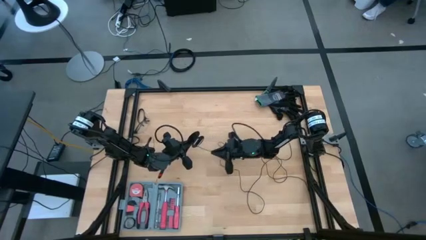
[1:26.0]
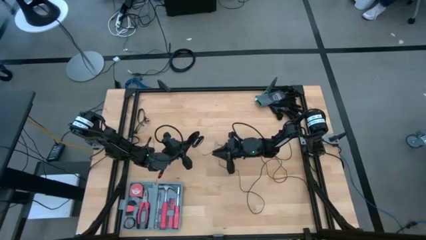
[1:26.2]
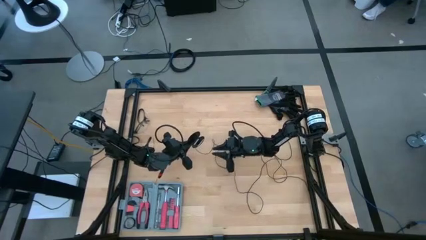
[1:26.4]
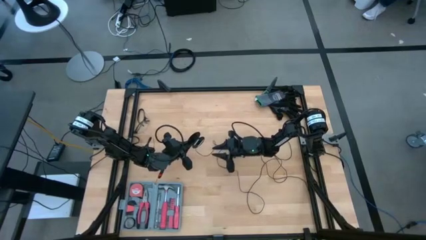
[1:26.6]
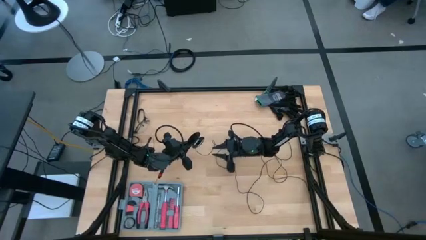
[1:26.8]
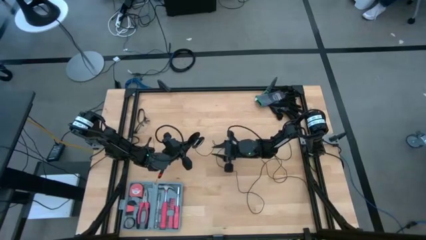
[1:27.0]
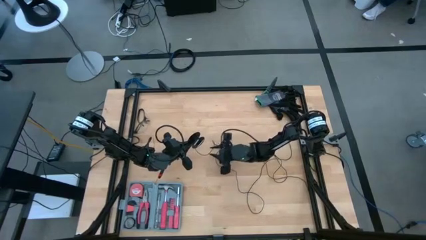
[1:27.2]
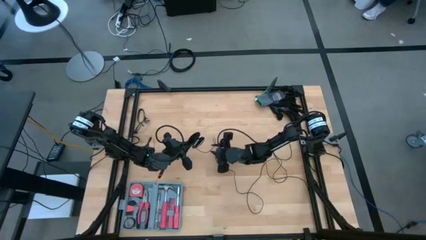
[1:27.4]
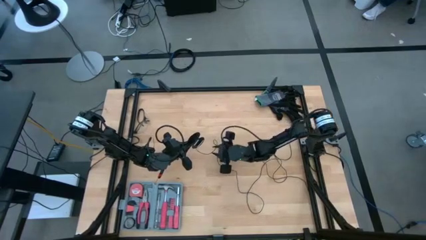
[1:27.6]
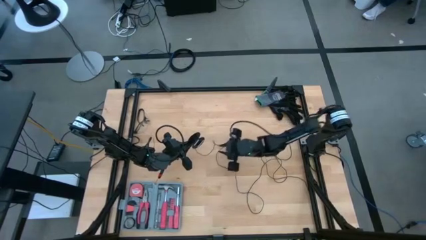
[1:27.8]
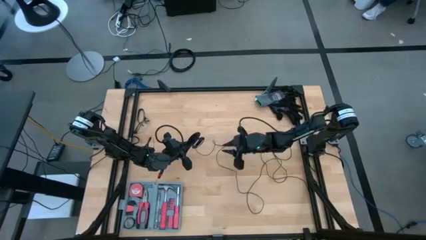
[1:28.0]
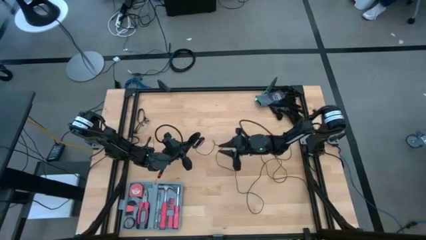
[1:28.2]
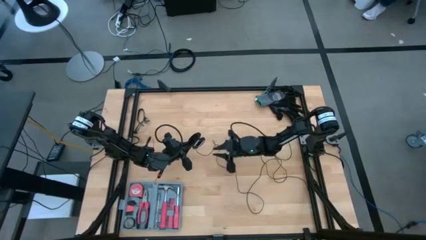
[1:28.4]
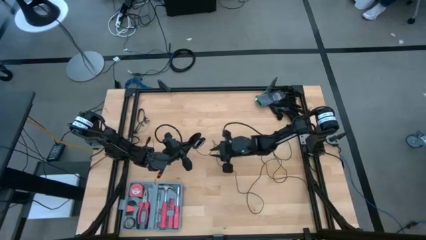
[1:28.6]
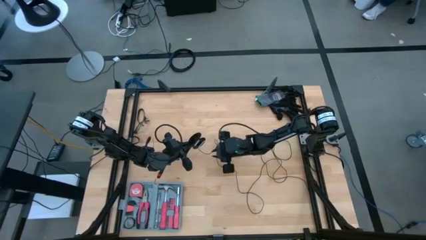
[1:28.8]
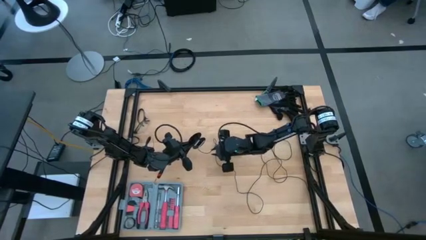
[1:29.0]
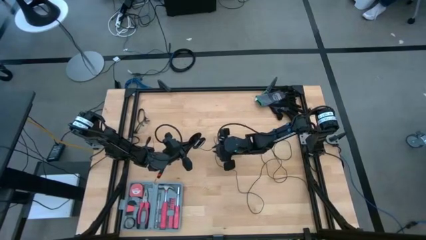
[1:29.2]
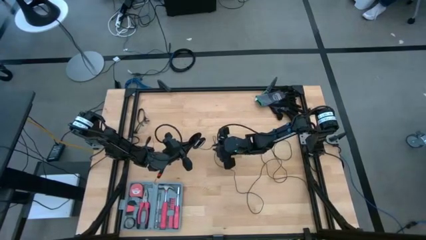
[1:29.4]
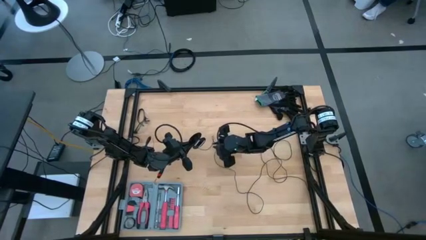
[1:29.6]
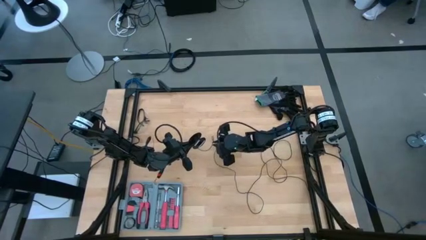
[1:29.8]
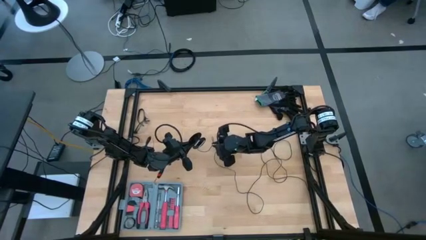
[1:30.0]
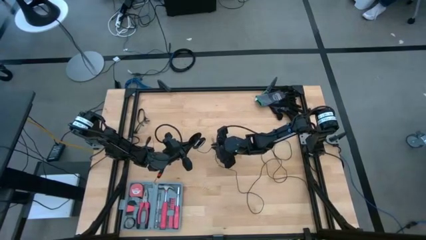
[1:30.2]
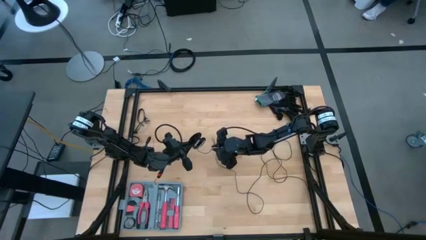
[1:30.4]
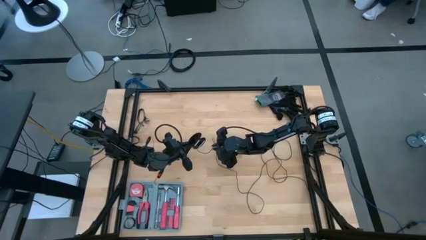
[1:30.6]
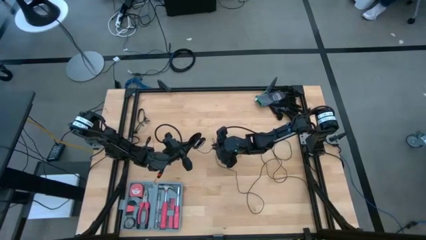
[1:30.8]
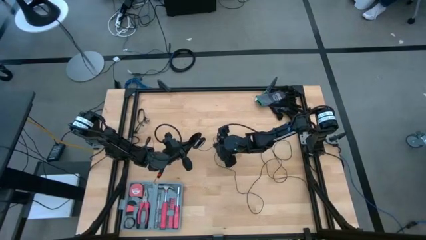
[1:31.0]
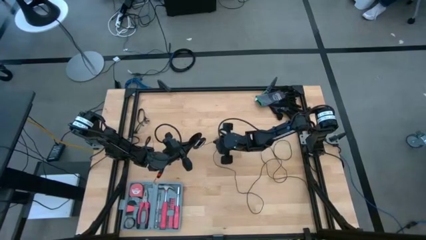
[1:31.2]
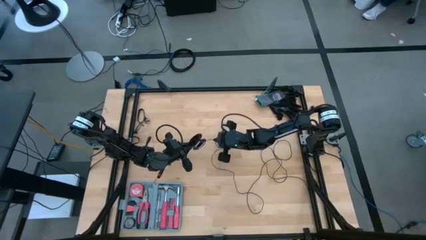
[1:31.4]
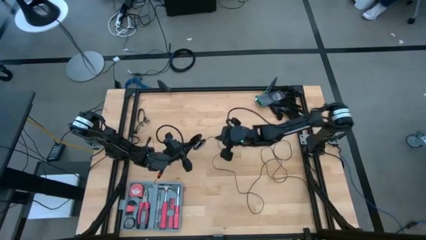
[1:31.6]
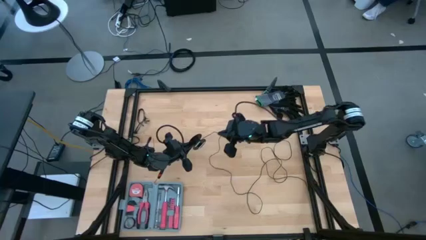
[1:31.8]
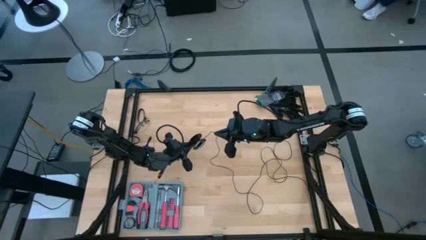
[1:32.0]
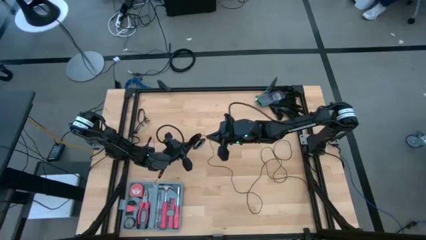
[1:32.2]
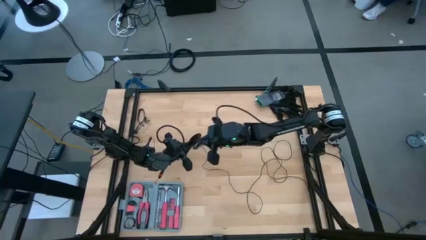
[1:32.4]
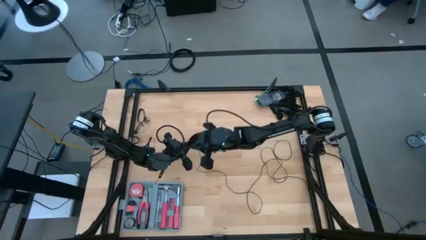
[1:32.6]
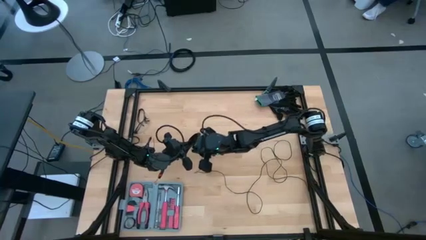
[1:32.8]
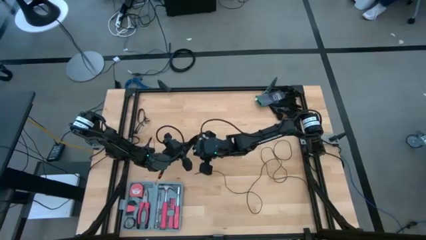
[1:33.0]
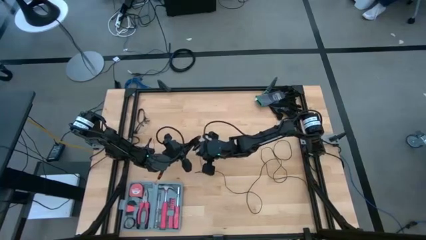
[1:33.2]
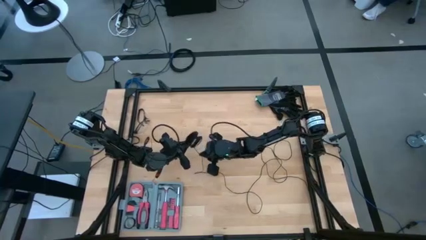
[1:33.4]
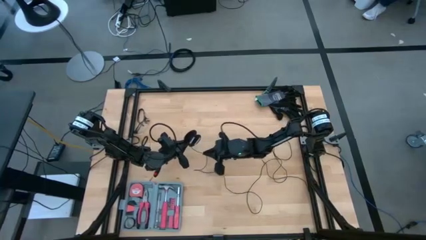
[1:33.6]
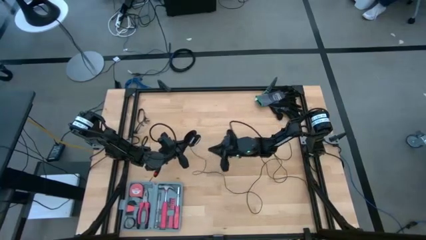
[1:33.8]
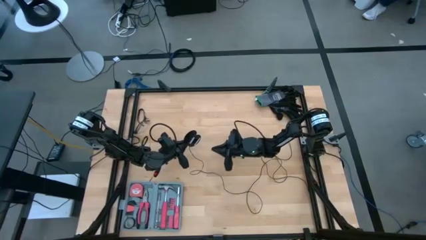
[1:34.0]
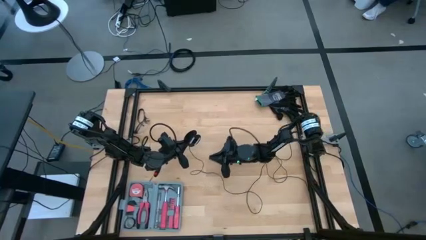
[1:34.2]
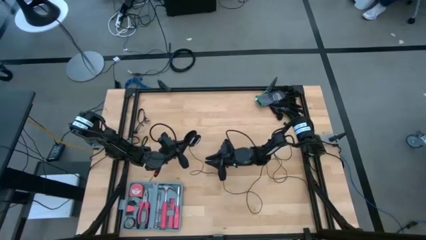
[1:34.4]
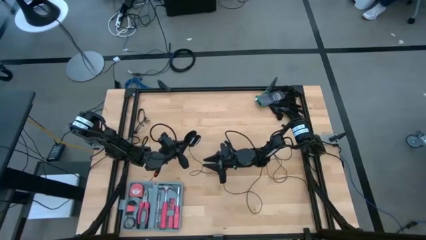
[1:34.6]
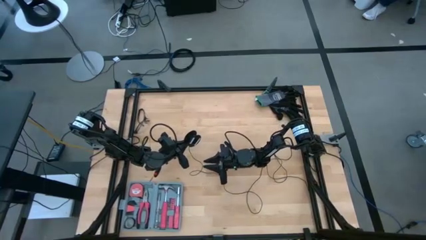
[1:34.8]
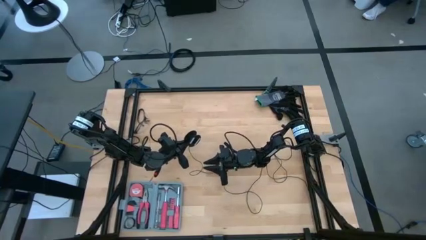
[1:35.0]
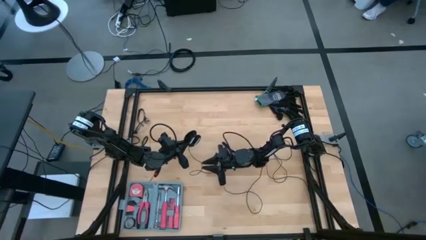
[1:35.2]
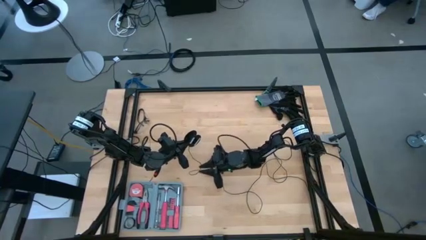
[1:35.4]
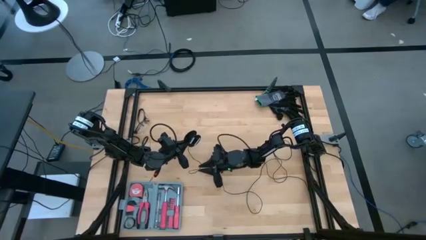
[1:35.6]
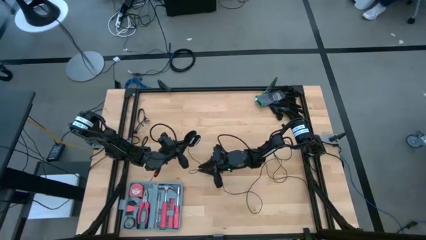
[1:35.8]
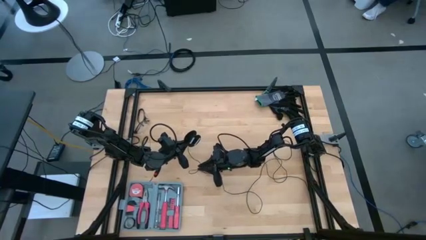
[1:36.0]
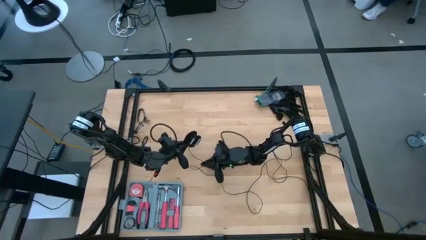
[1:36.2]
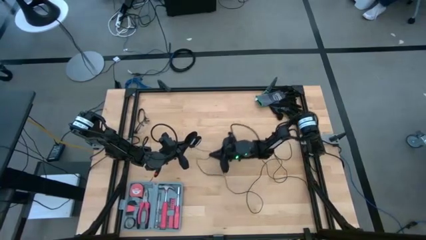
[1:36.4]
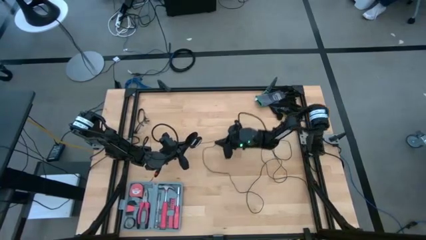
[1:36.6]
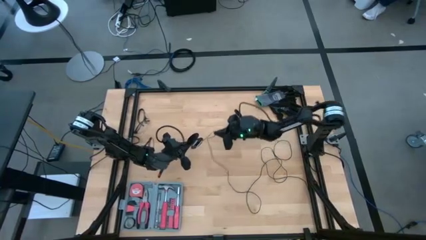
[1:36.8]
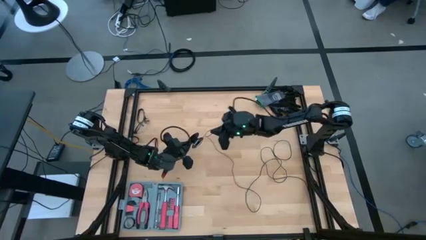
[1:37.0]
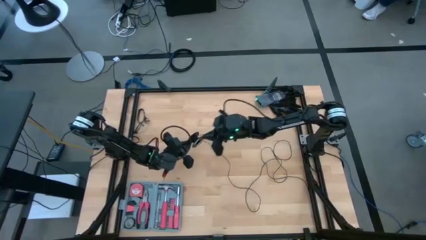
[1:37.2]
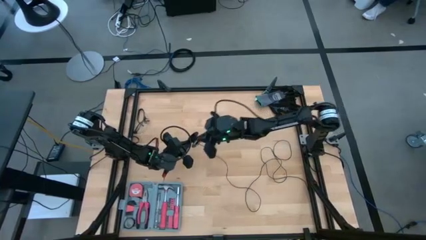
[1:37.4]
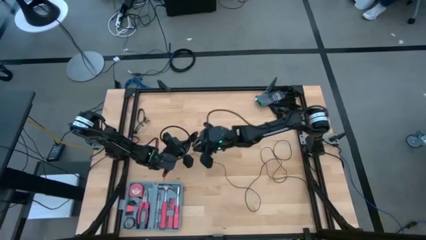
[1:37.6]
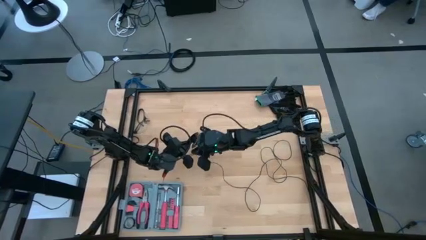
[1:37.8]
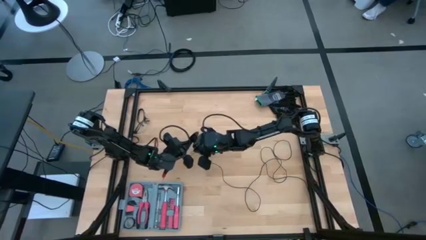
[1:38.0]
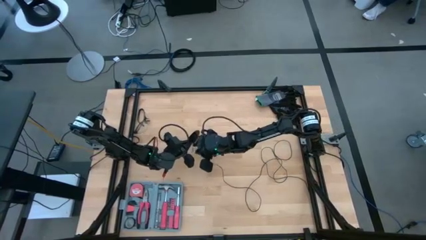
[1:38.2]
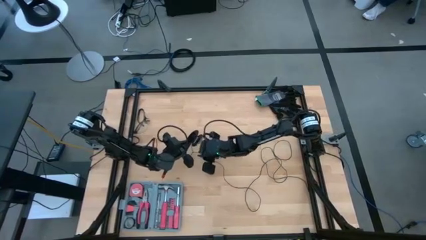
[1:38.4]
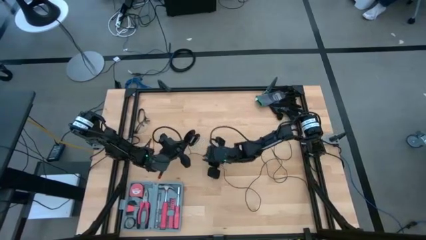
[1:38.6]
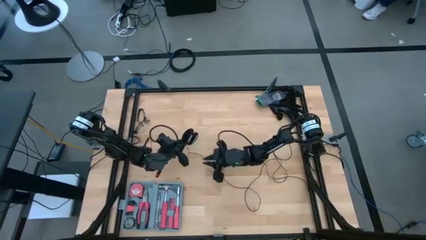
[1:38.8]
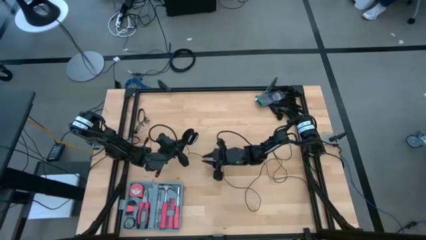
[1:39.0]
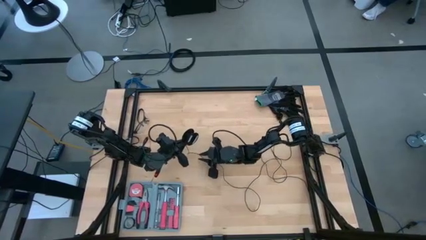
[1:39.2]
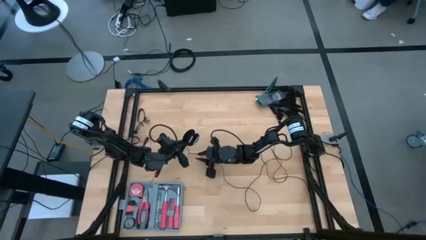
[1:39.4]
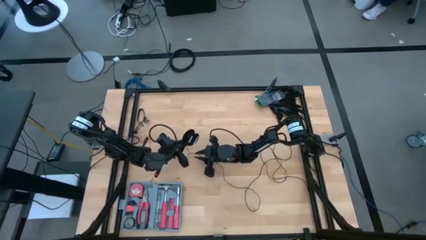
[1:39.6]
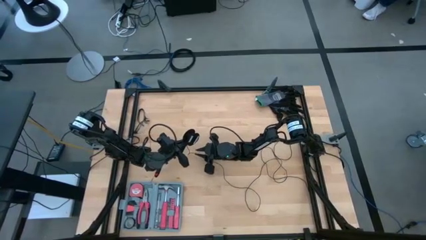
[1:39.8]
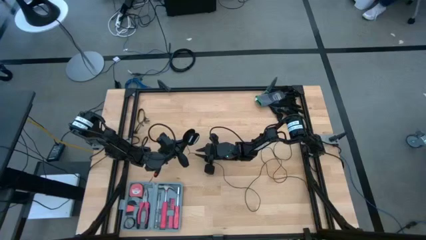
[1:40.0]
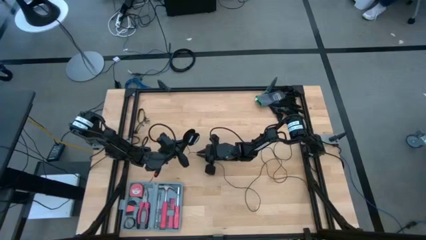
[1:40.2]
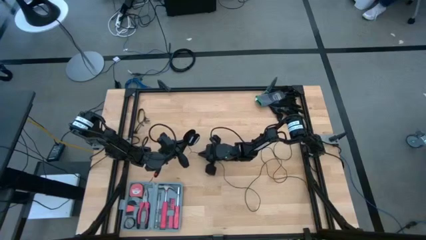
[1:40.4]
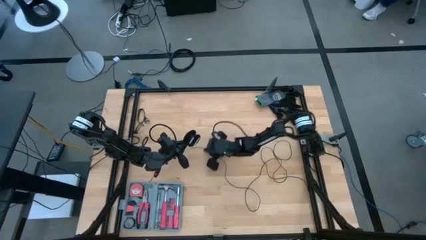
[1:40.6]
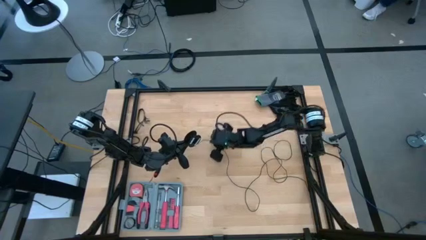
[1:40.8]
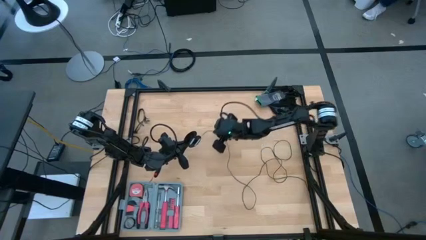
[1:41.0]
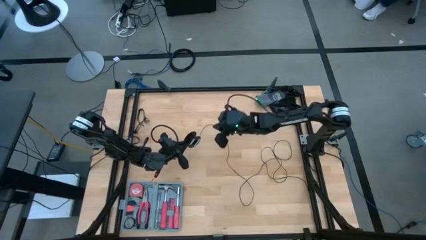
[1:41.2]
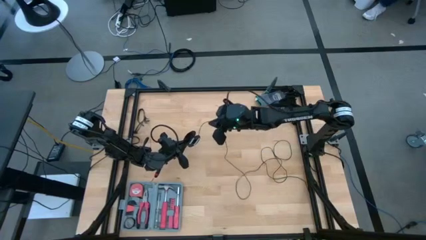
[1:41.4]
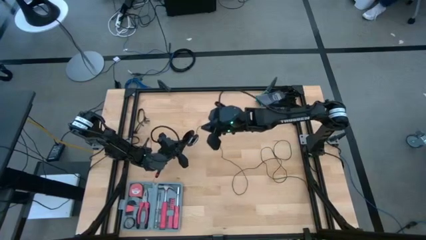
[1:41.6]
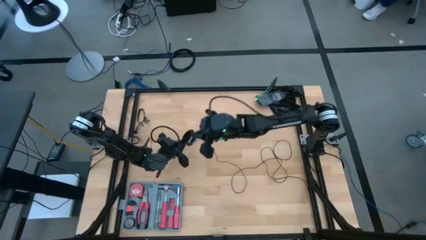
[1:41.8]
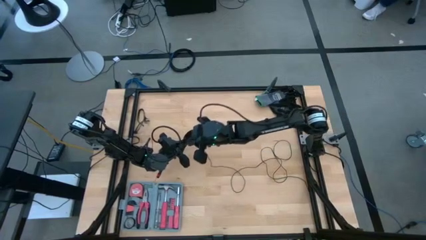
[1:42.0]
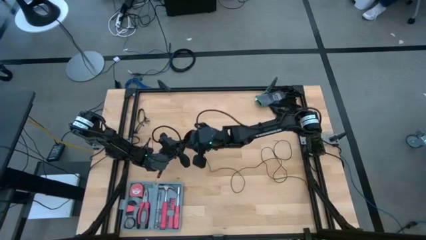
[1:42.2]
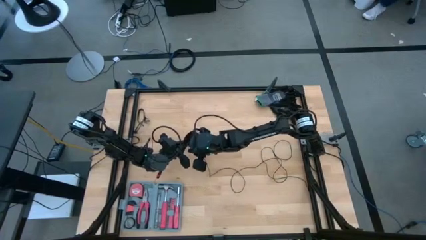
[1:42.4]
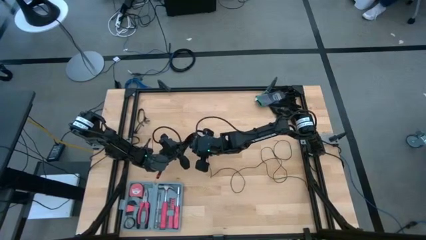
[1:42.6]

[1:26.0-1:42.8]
Task: Coil cords
Coil the black wire onto the spool
